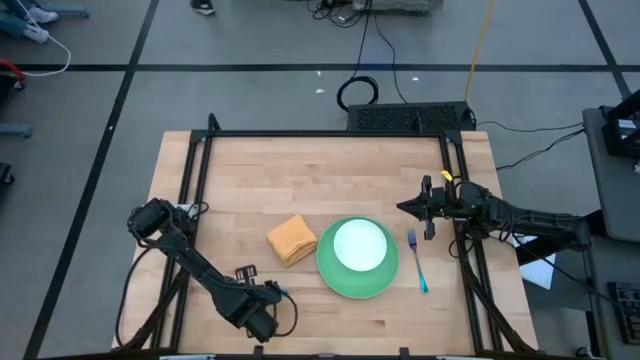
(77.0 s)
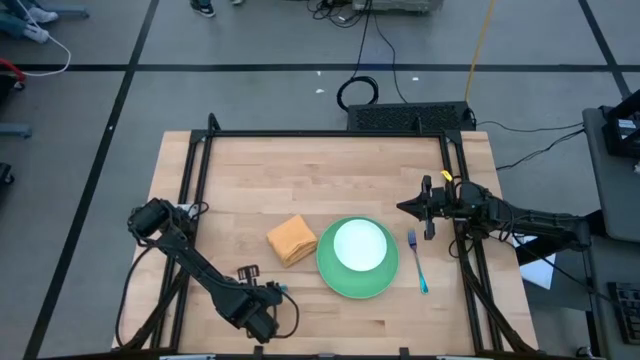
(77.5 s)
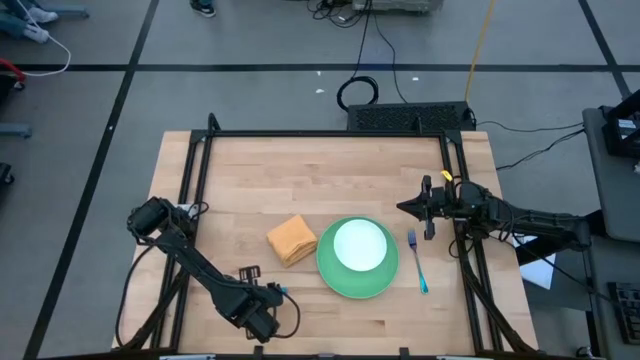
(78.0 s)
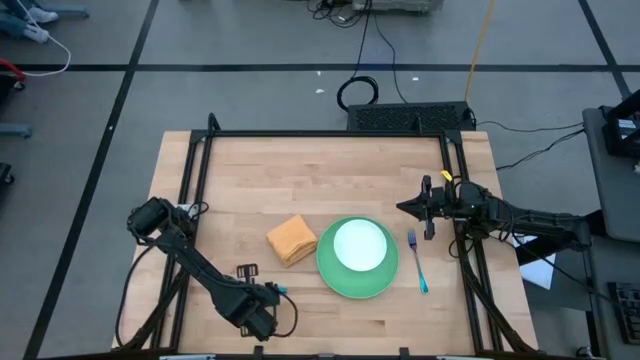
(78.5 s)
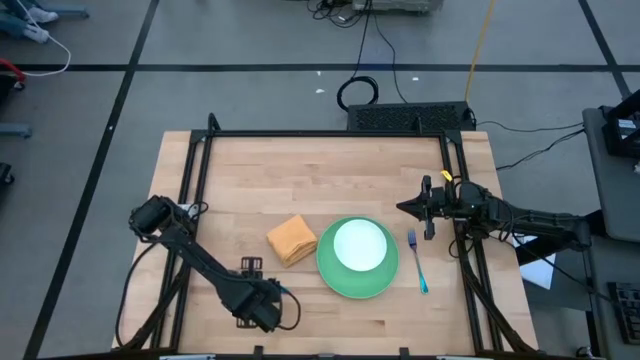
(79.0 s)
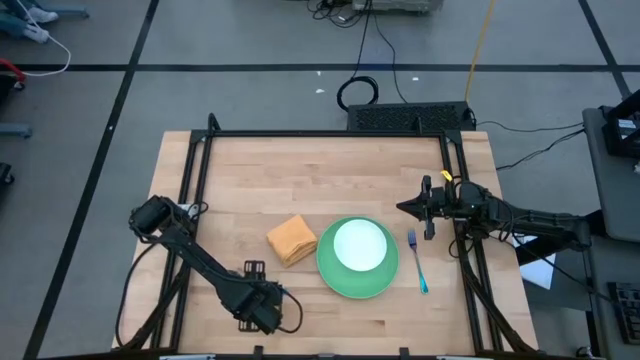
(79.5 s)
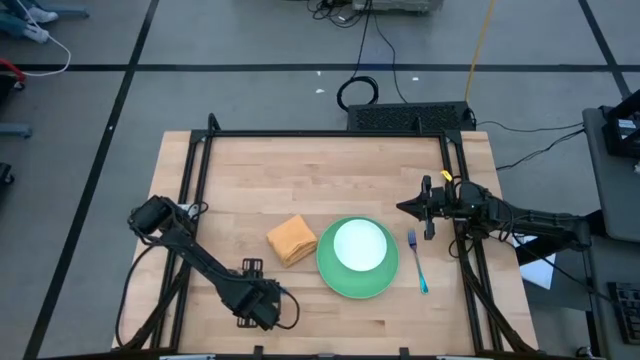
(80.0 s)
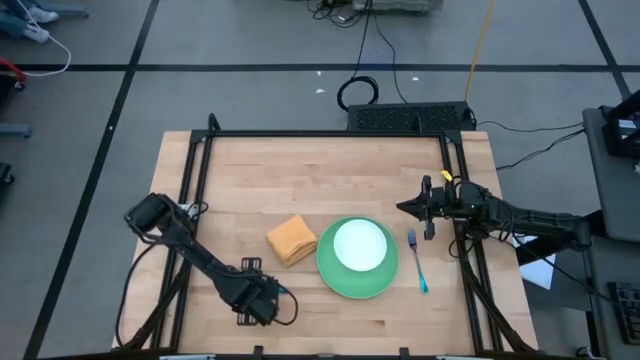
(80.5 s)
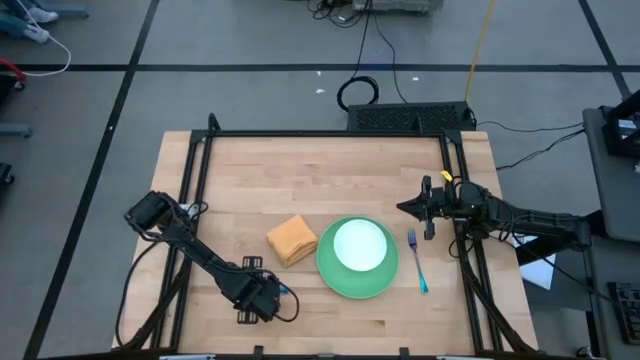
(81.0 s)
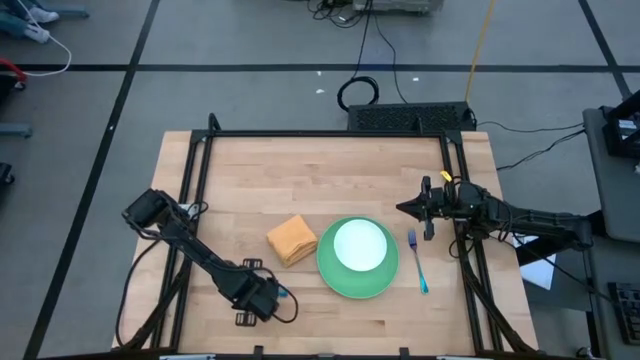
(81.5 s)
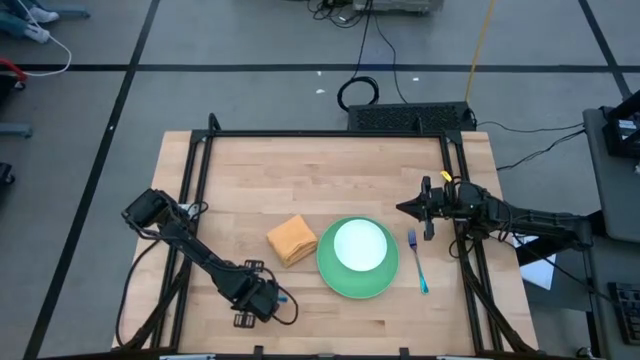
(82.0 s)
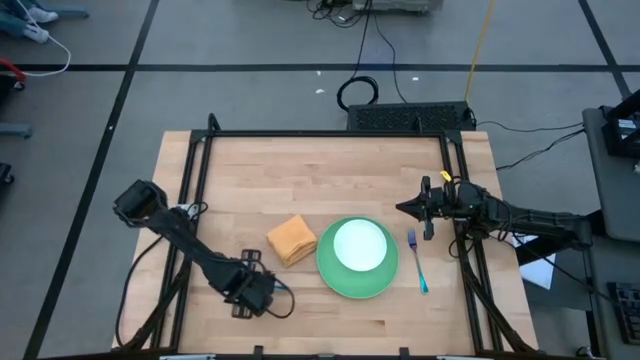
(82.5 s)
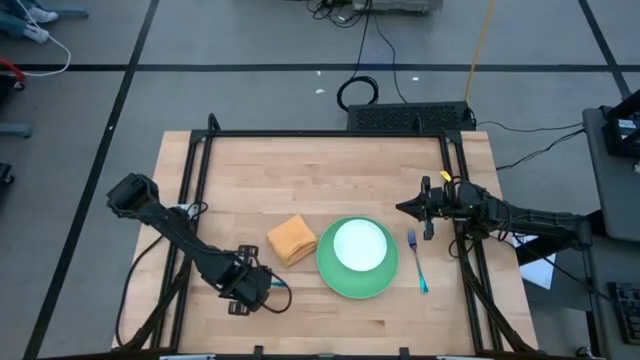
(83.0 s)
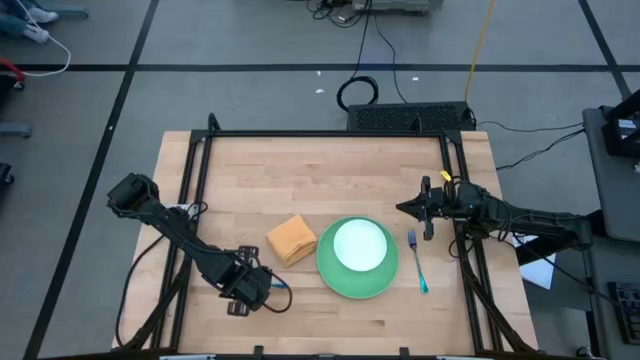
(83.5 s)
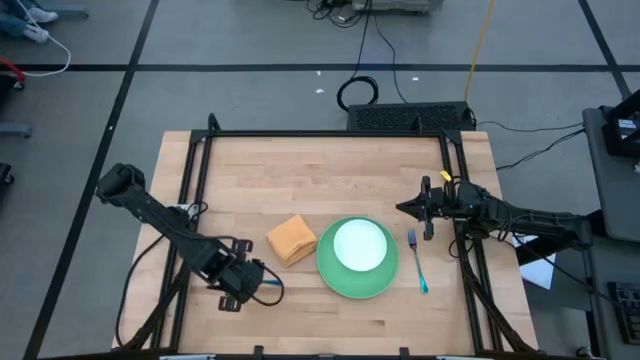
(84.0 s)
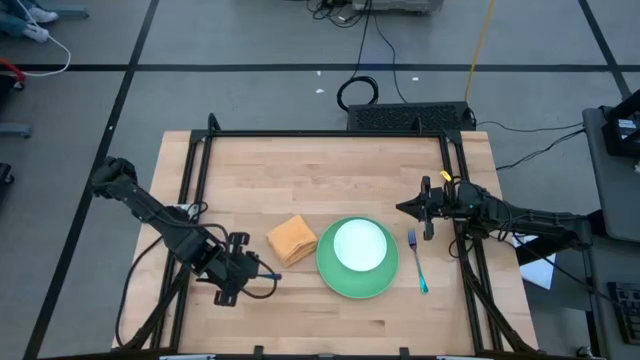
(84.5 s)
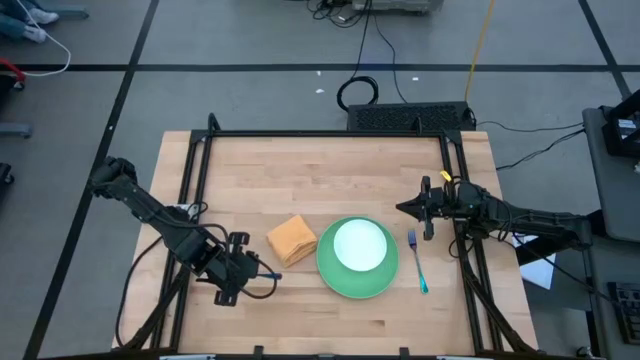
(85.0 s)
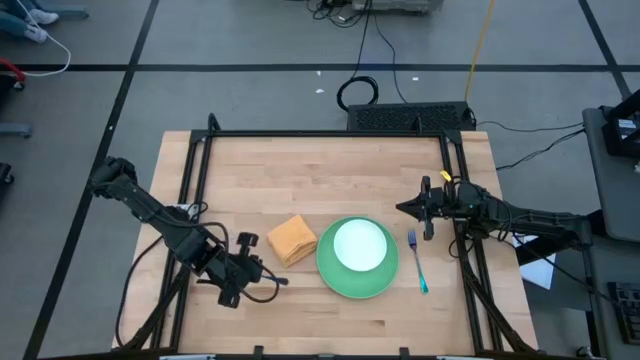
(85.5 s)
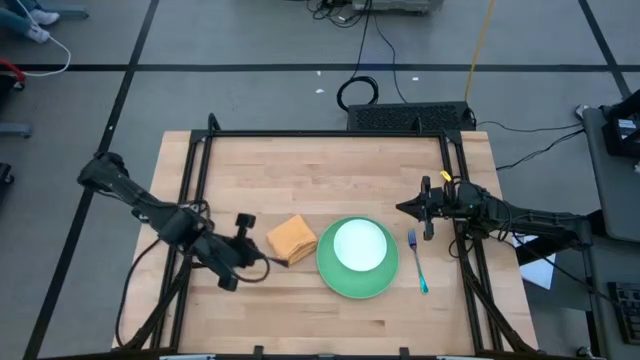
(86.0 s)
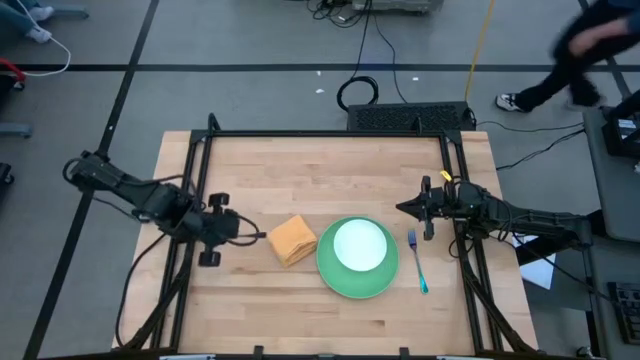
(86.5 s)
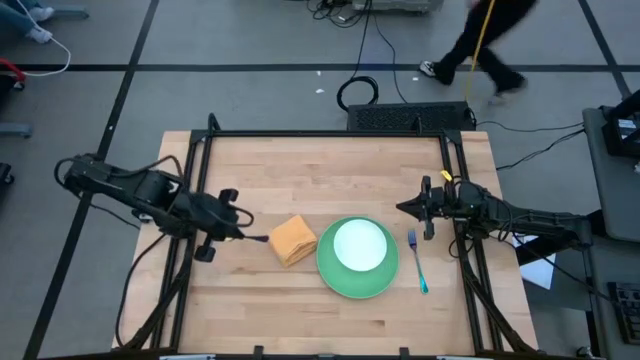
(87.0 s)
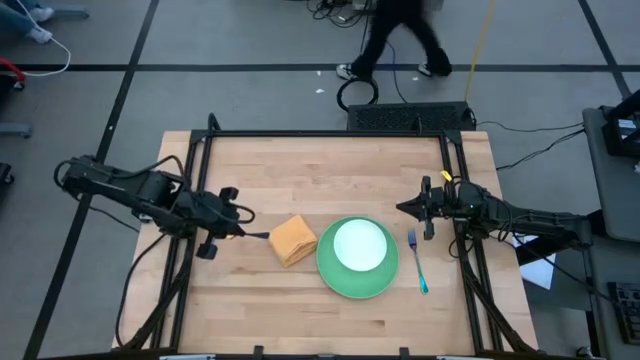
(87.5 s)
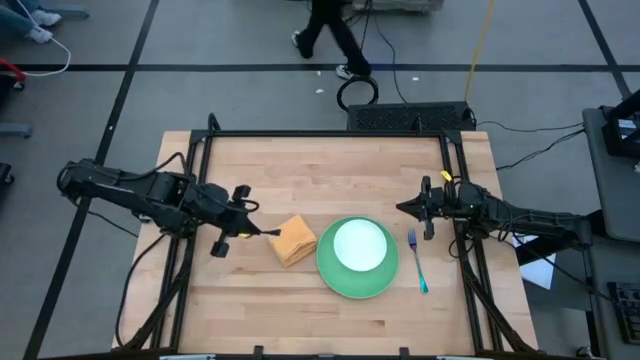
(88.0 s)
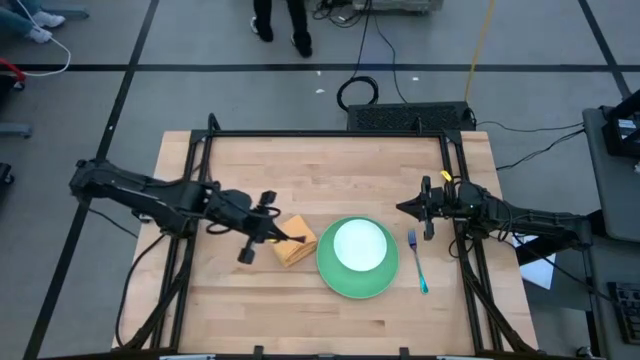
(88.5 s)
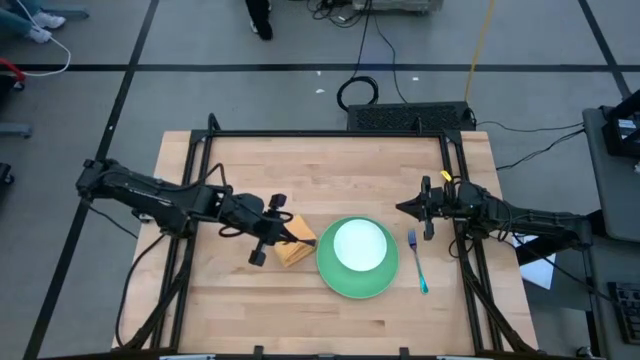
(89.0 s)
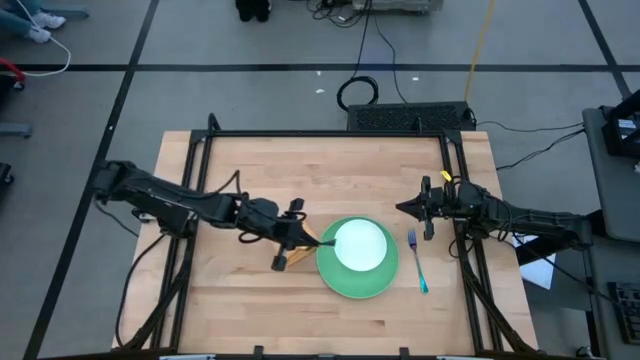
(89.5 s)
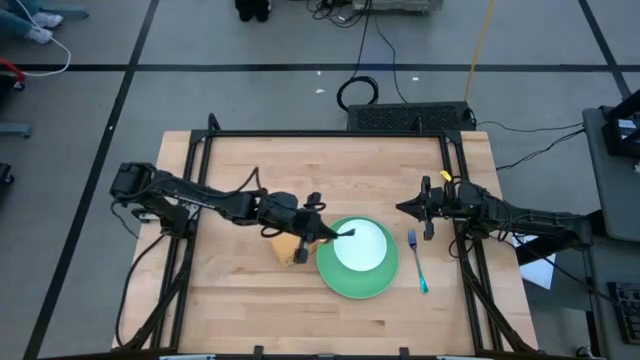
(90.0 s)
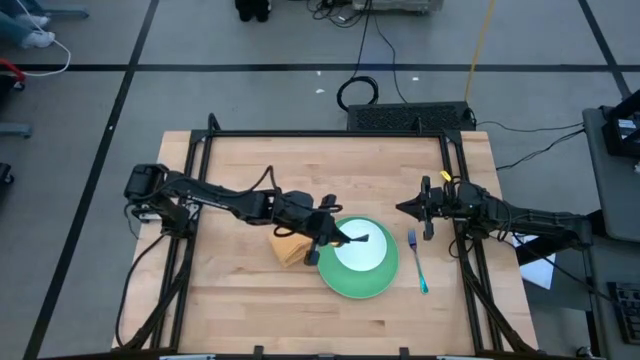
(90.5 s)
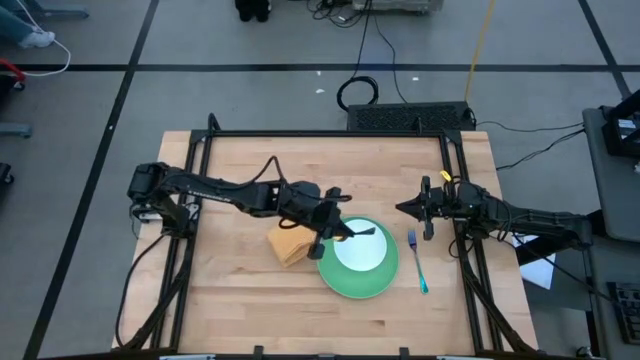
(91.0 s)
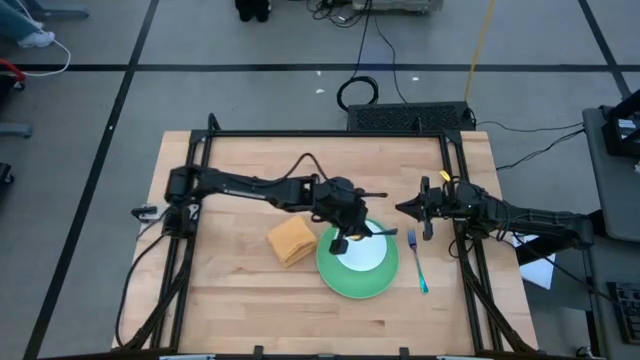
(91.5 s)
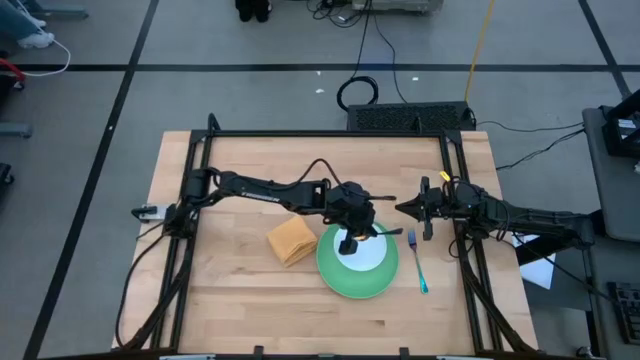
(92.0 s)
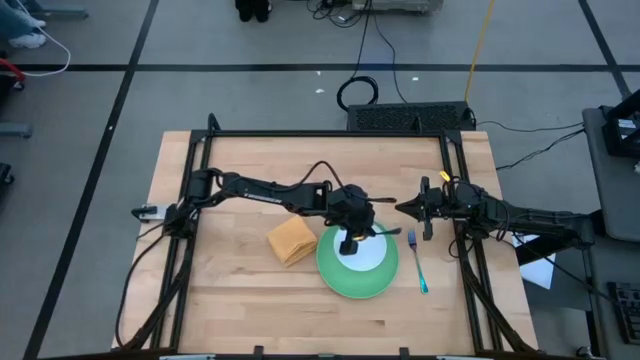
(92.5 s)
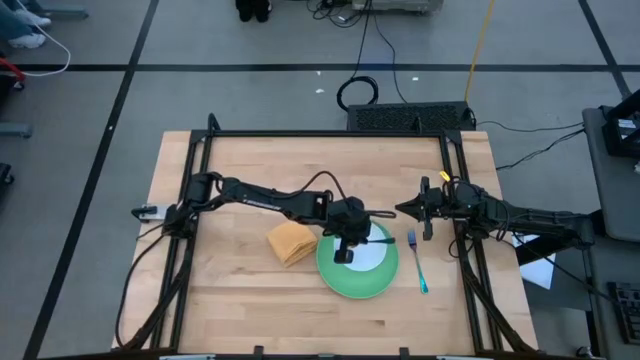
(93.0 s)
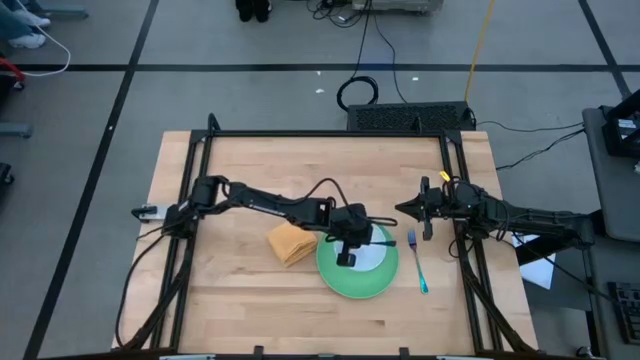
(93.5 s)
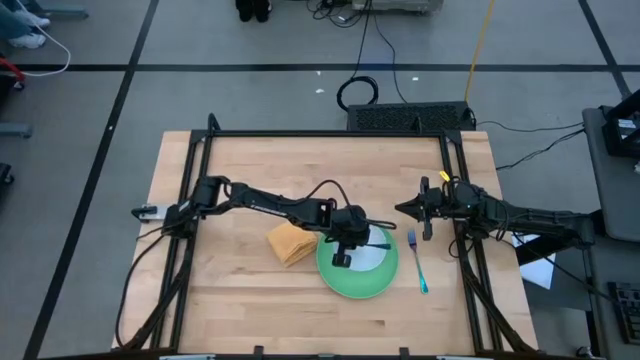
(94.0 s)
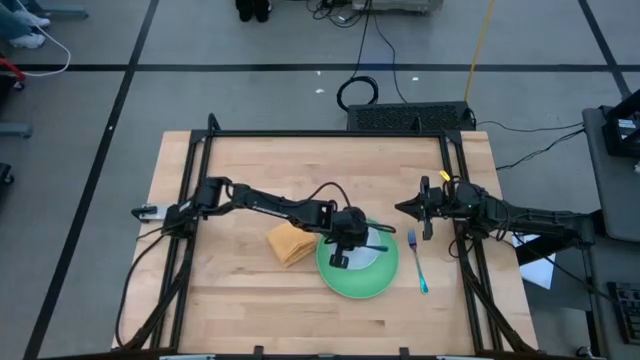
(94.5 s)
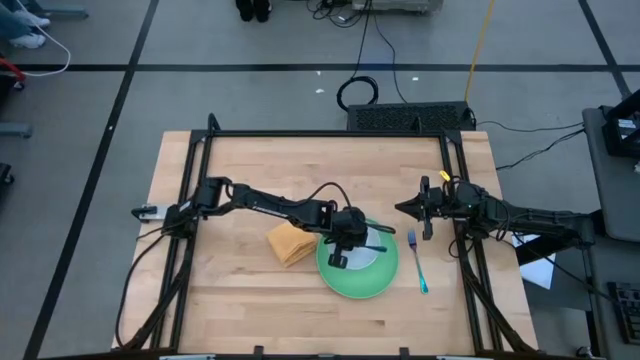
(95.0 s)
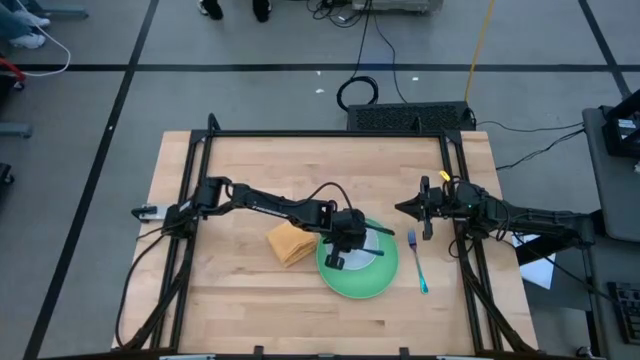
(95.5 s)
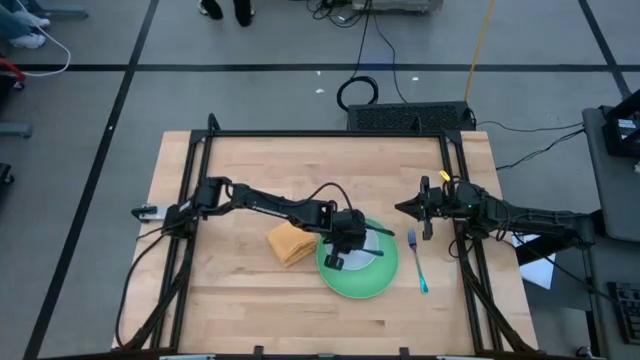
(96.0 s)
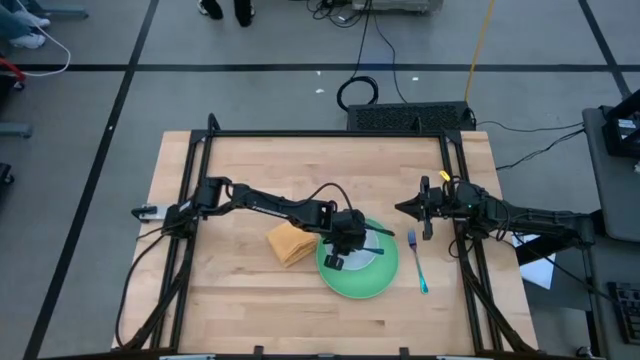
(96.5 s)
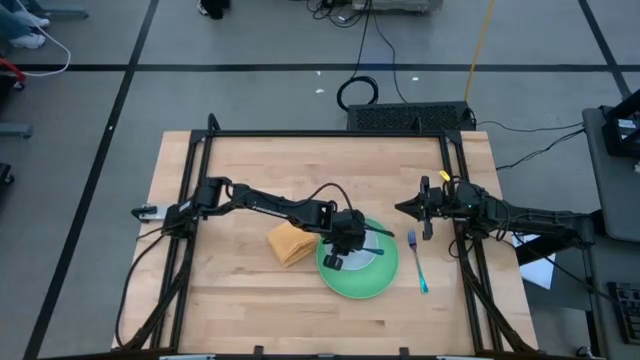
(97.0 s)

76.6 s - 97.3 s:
Task: Set table place
Put the purple spoon into the white bowl
